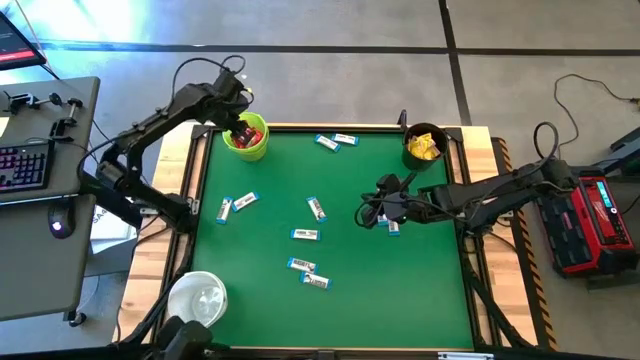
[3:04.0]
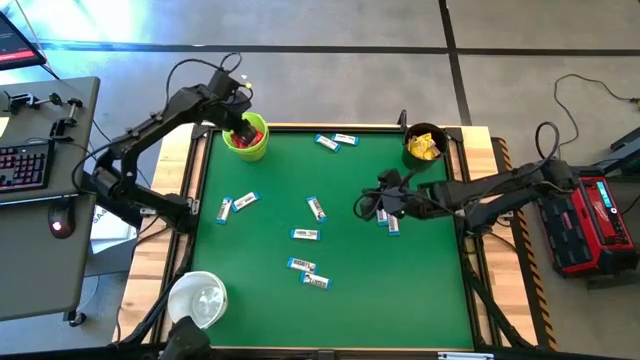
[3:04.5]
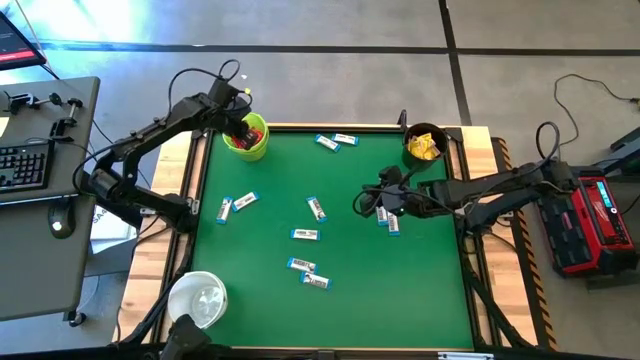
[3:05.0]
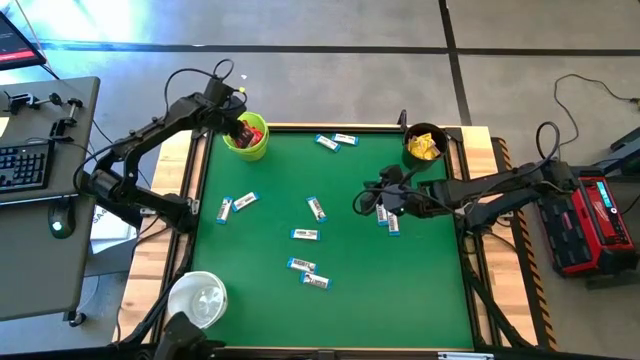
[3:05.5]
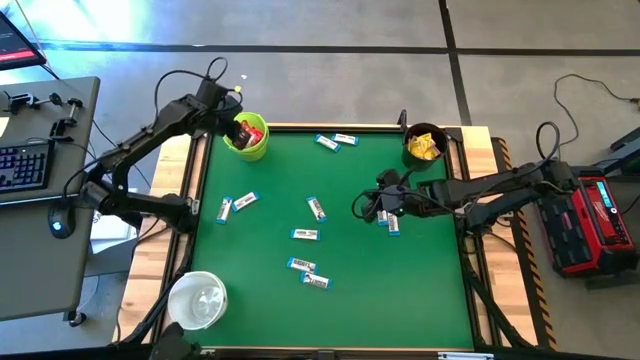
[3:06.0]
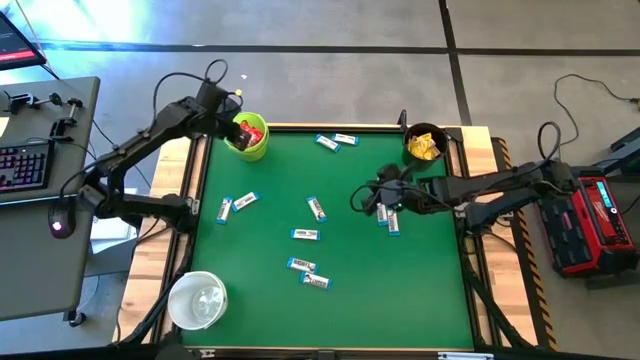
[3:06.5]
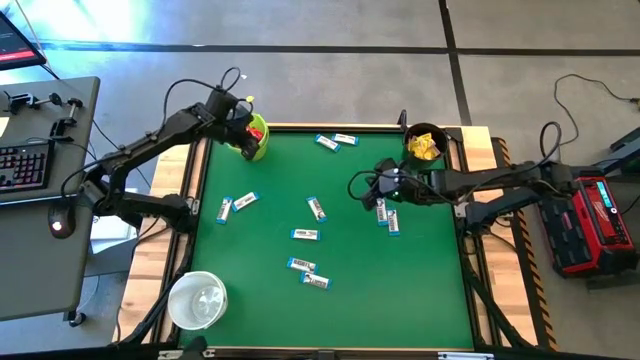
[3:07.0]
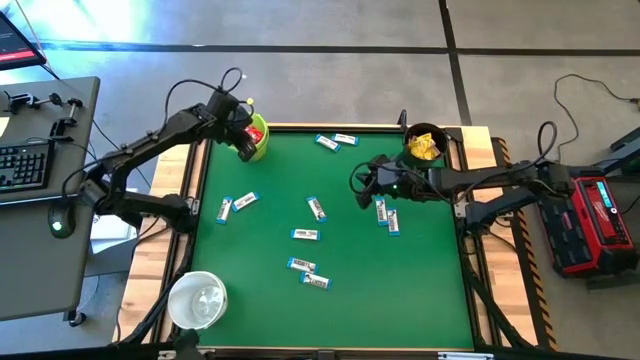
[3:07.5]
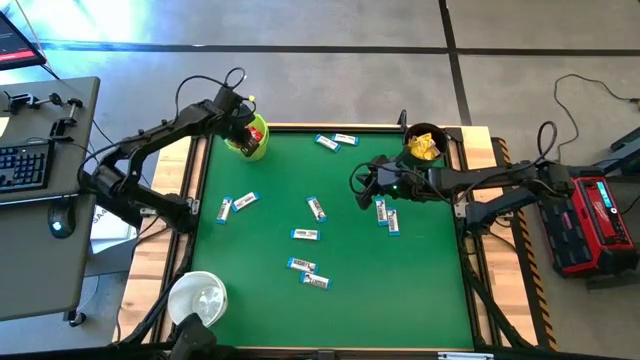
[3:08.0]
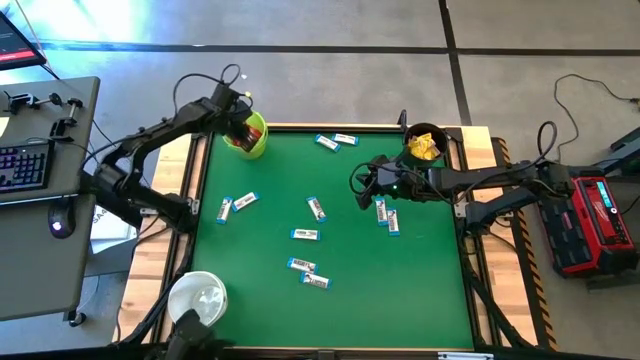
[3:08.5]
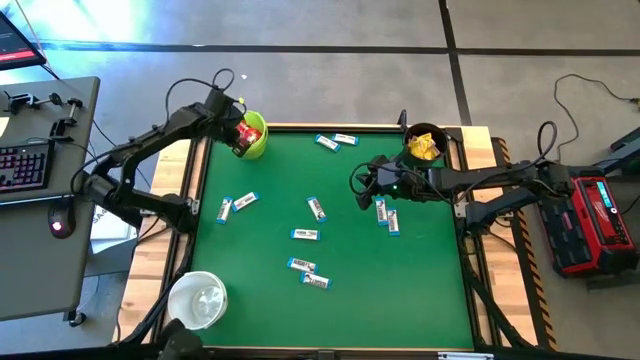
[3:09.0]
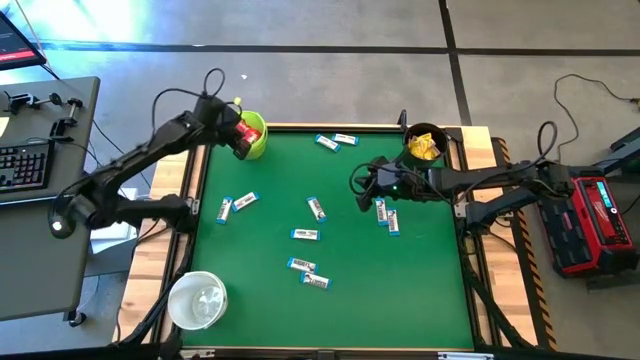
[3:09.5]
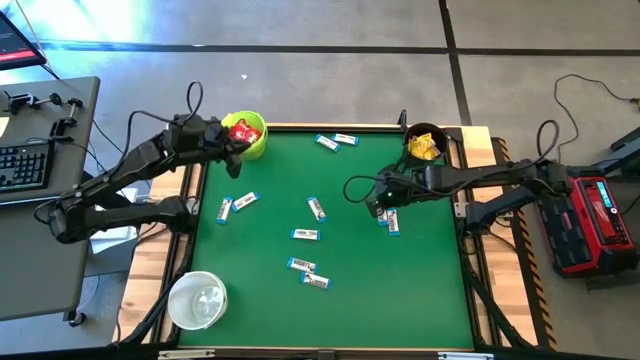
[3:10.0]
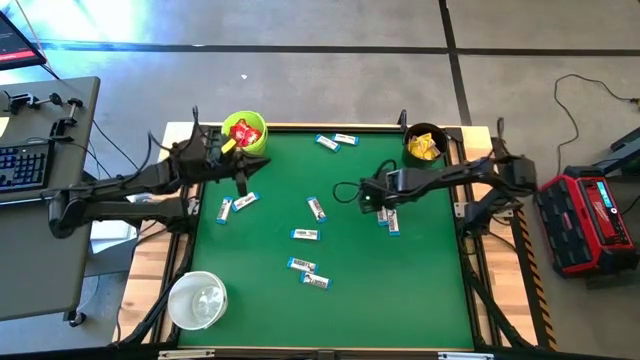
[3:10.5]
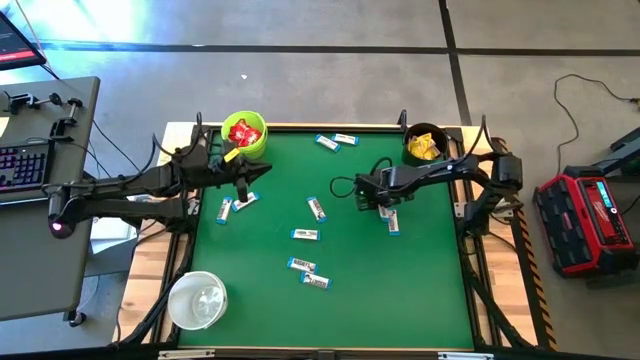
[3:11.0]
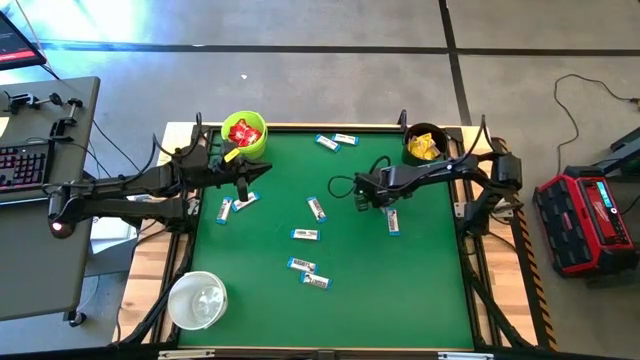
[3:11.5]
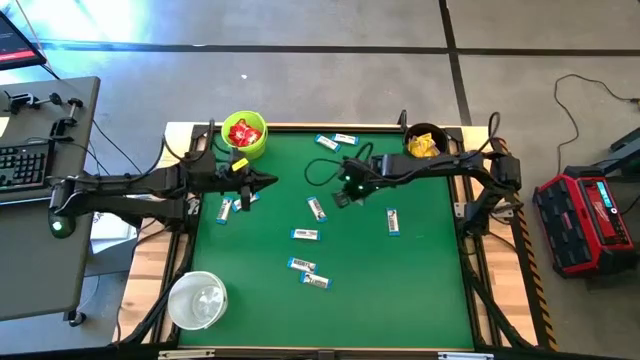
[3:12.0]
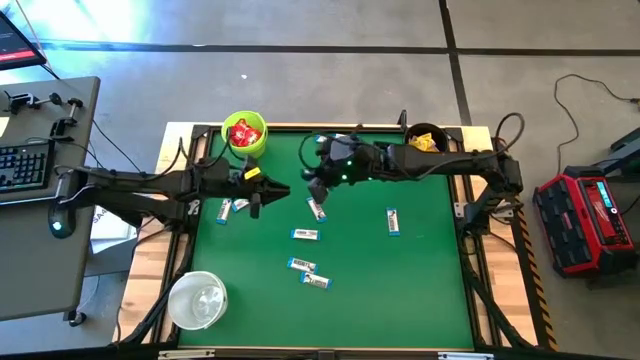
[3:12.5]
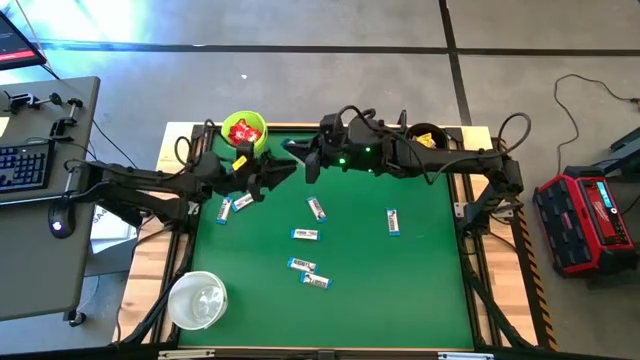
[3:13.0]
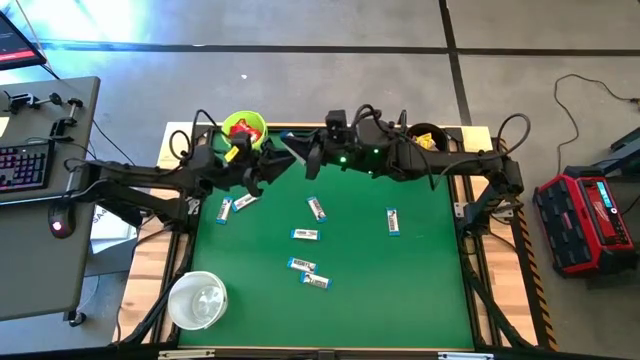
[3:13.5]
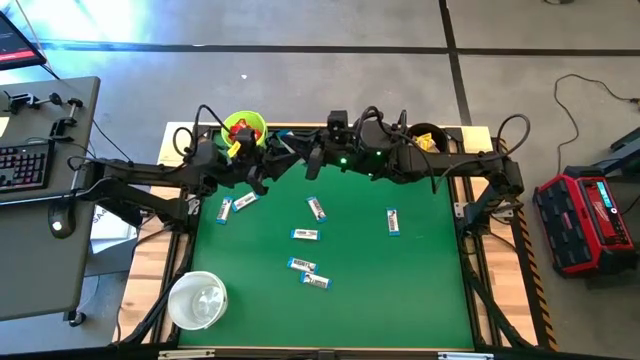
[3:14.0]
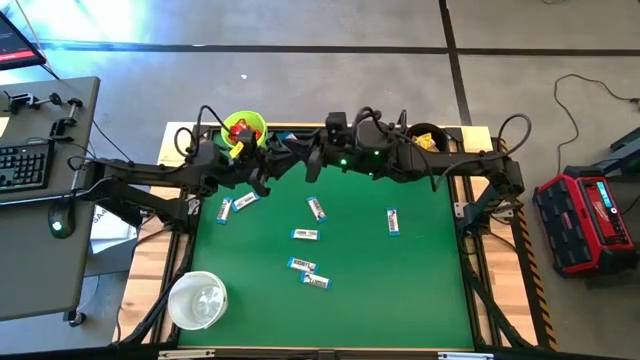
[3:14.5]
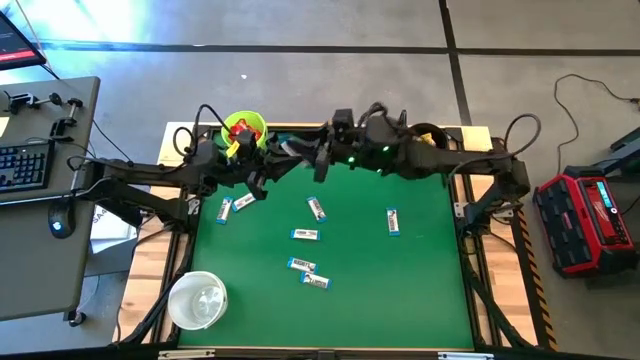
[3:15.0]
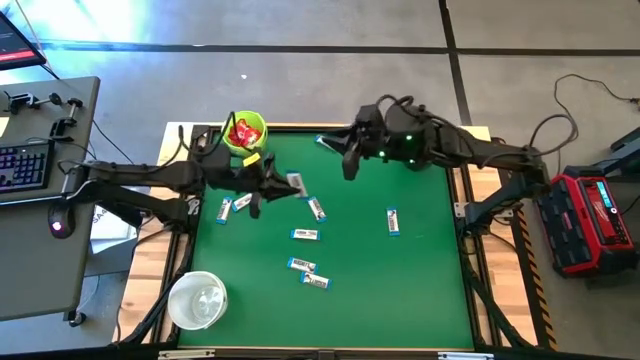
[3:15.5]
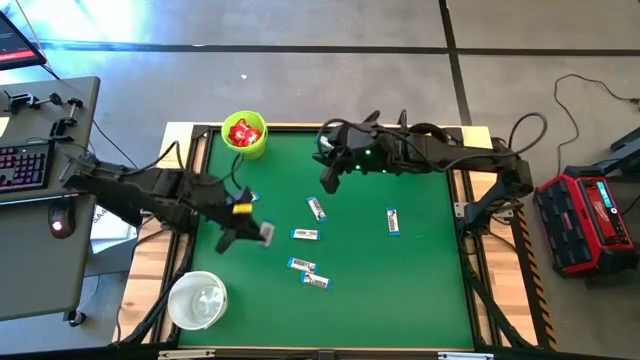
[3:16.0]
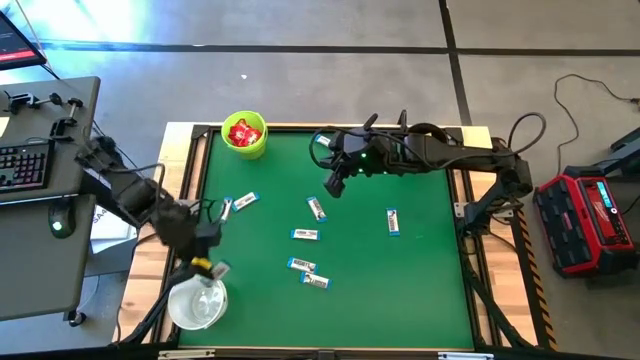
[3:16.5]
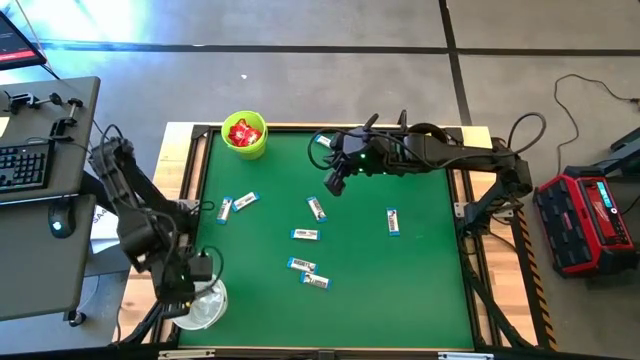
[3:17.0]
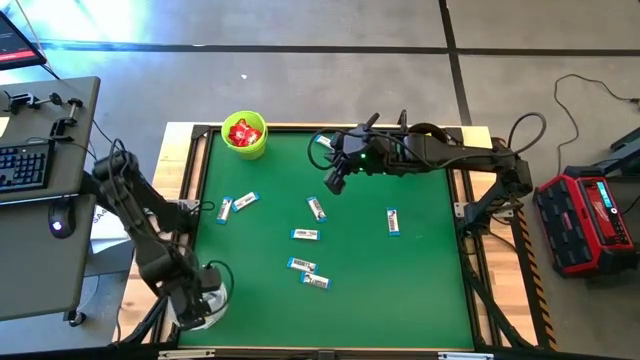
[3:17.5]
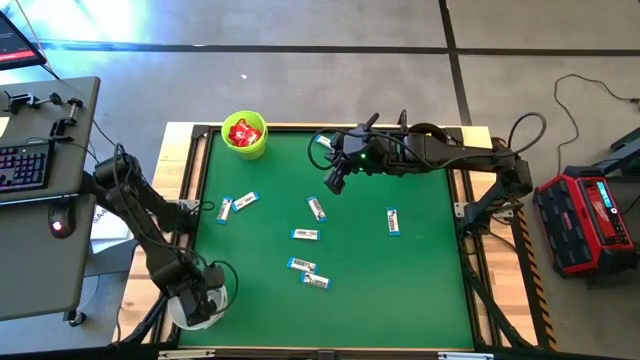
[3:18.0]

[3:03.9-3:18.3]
Task: Sort candy by brand, put in halloween buckets
Put the white chocolate into the white bucket

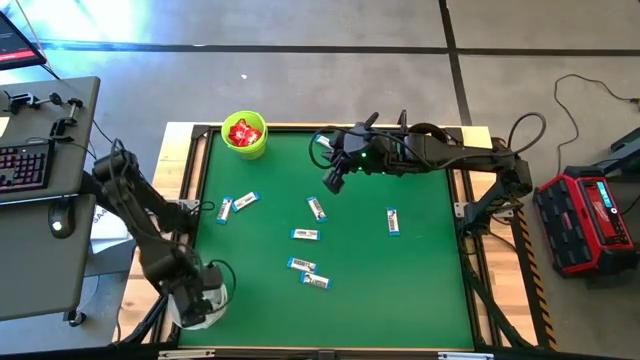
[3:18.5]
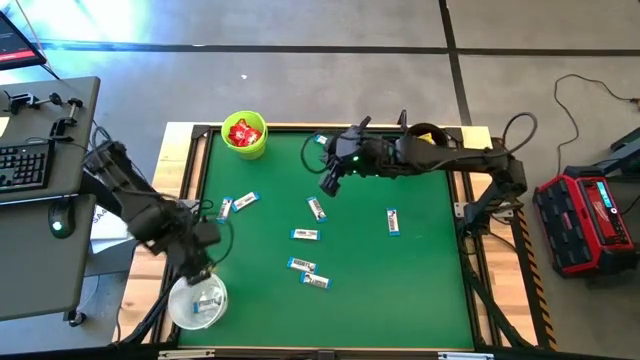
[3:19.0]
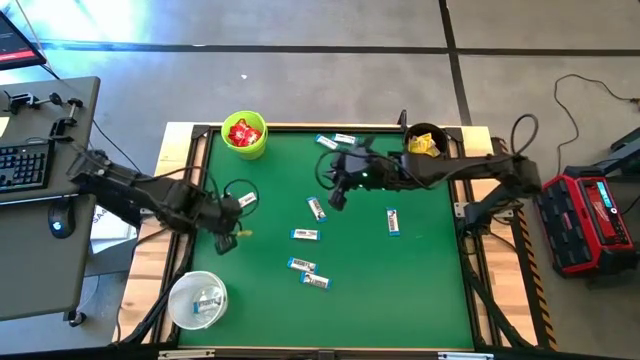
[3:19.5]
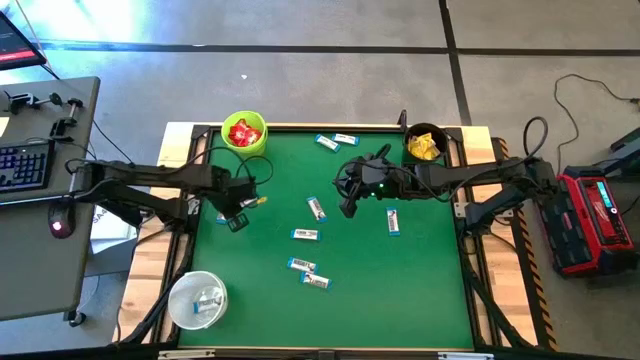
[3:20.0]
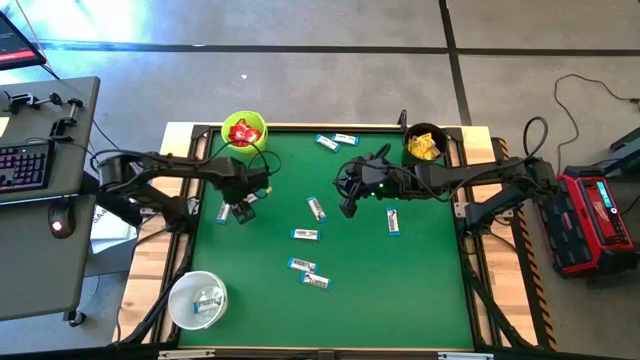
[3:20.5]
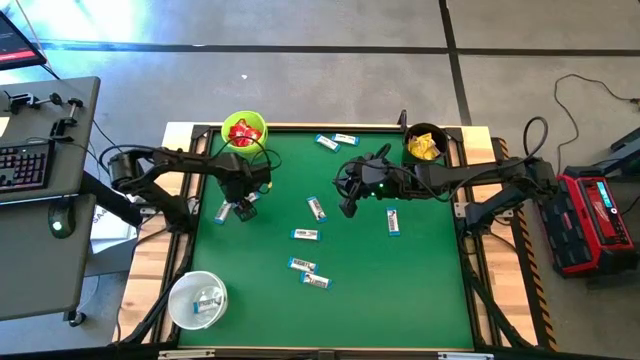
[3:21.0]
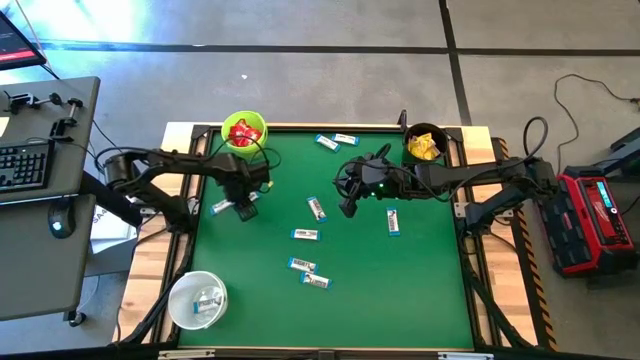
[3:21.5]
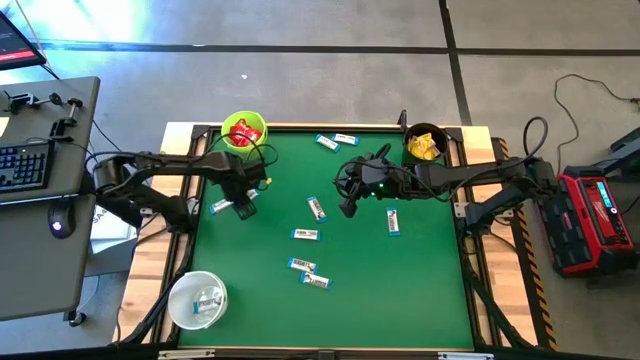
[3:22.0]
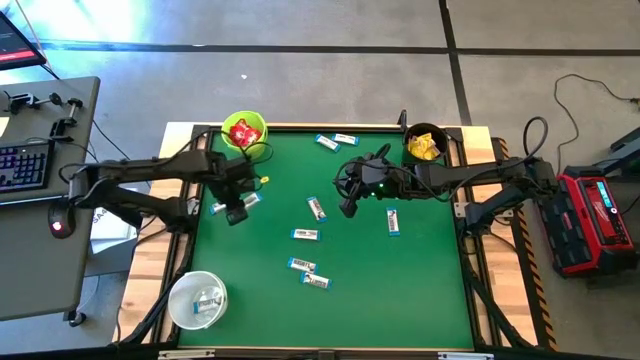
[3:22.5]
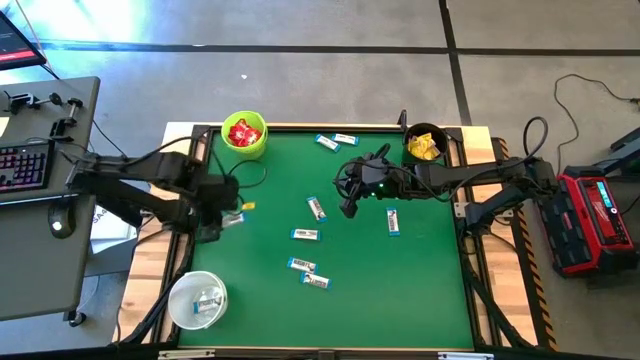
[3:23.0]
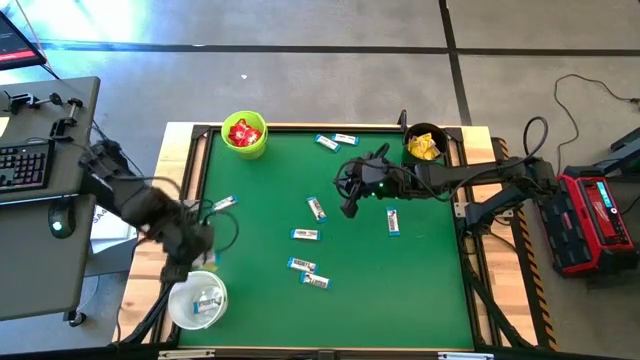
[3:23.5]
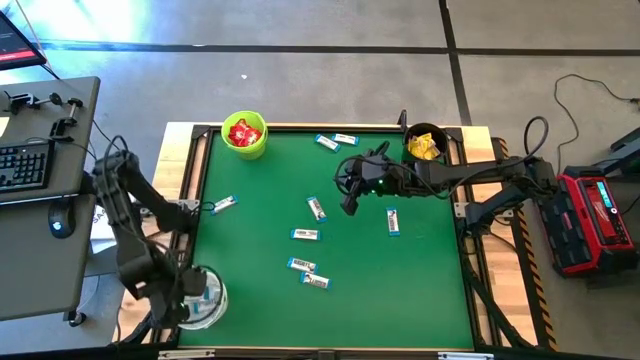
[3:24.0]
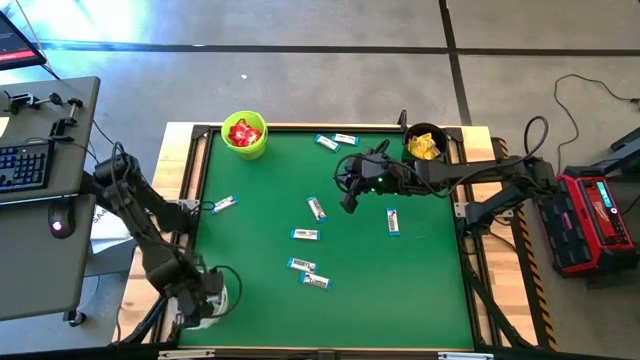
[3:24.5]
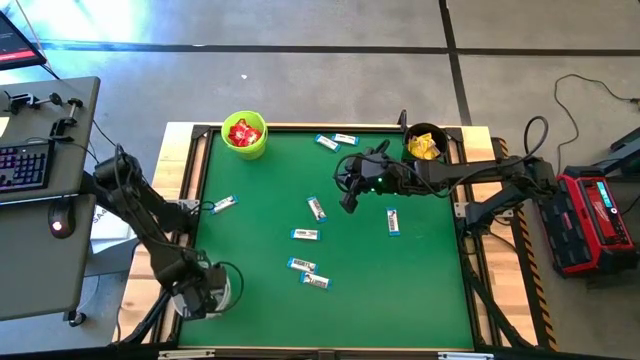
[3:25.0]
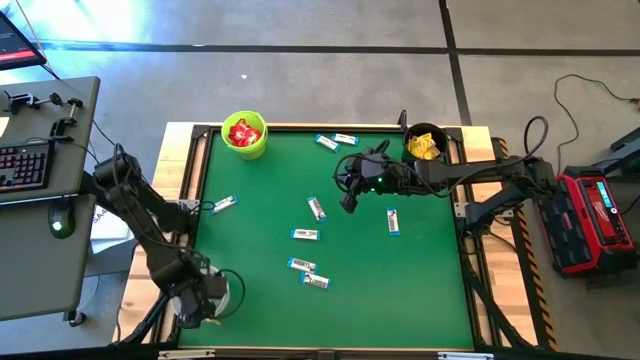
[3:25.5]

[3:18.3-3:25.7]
Put the white chocolate into the white bucket
